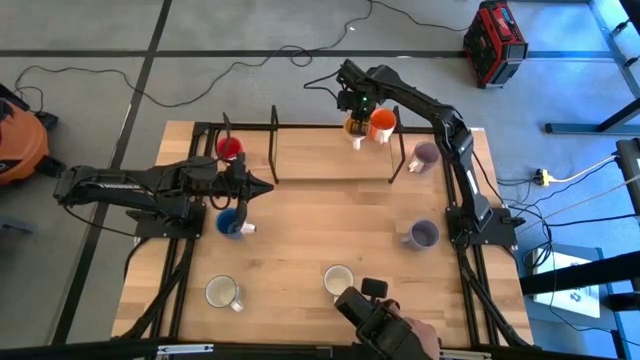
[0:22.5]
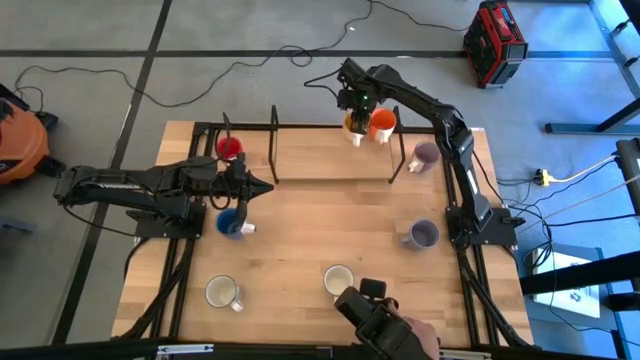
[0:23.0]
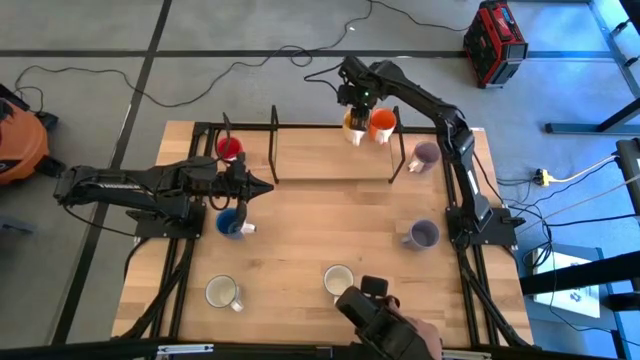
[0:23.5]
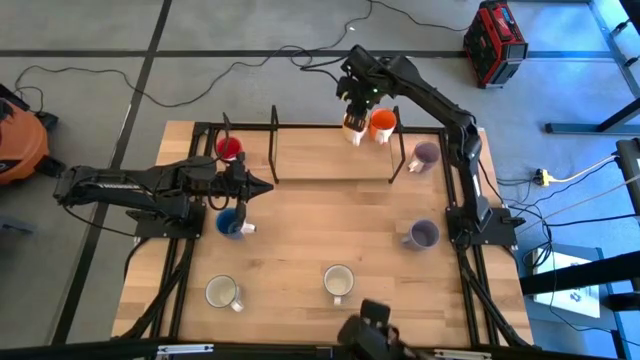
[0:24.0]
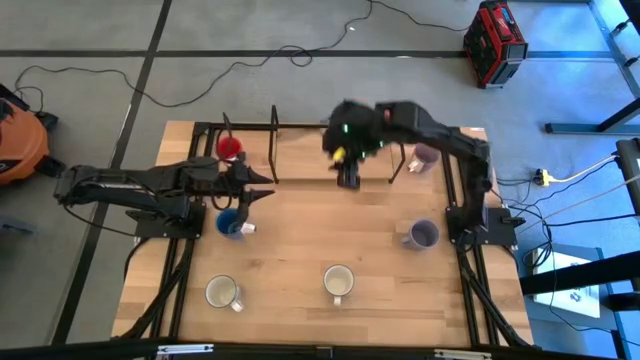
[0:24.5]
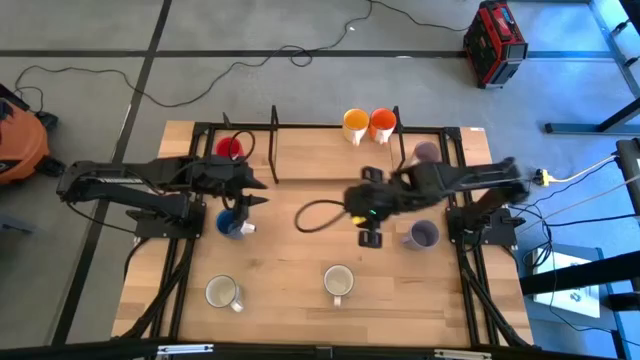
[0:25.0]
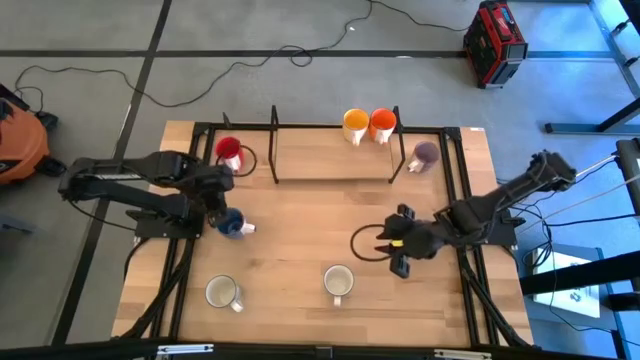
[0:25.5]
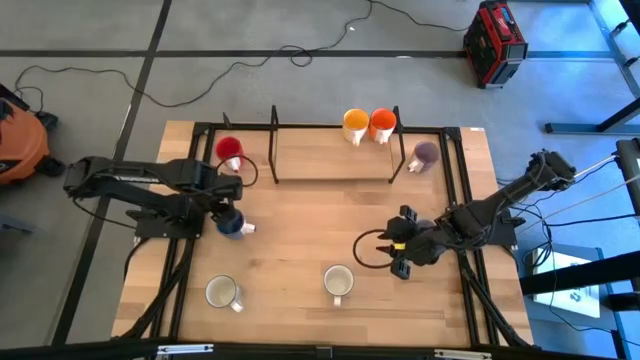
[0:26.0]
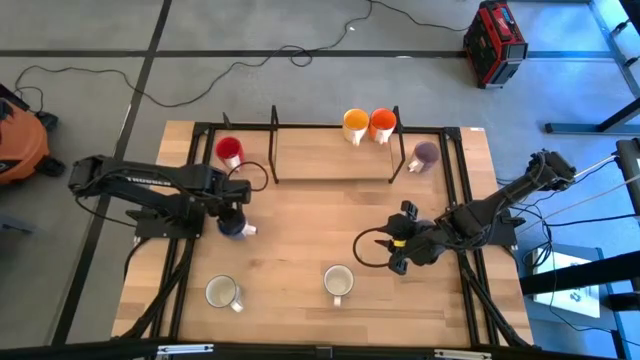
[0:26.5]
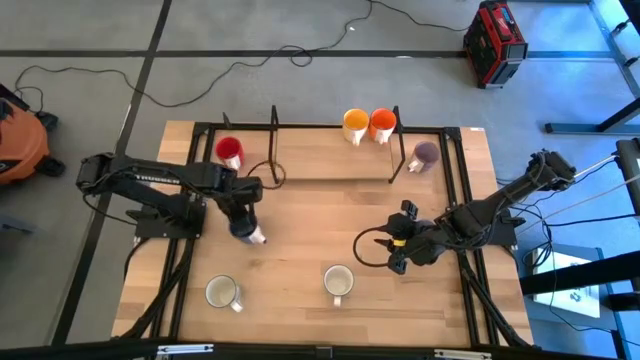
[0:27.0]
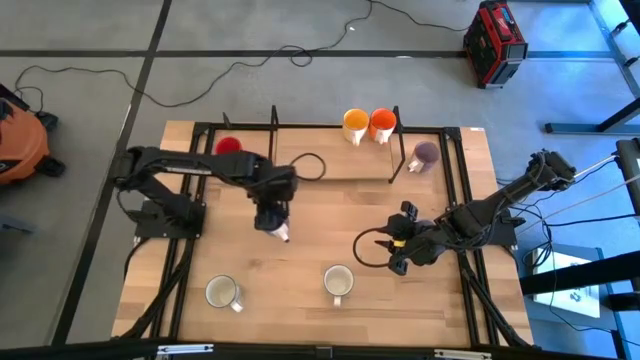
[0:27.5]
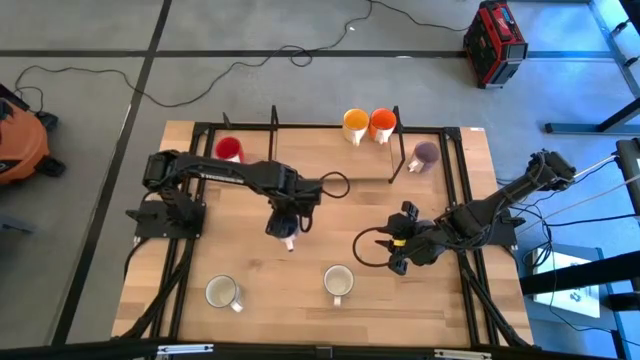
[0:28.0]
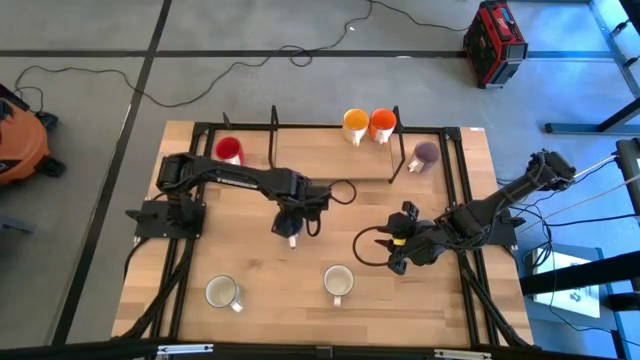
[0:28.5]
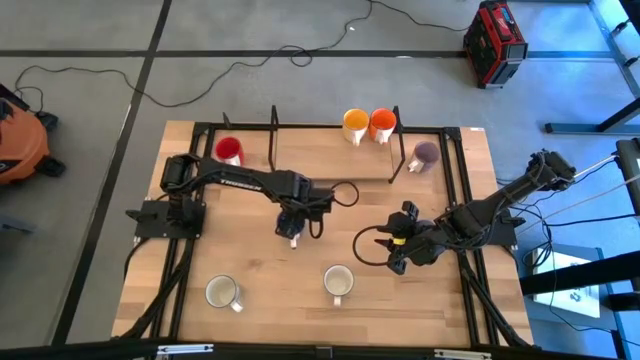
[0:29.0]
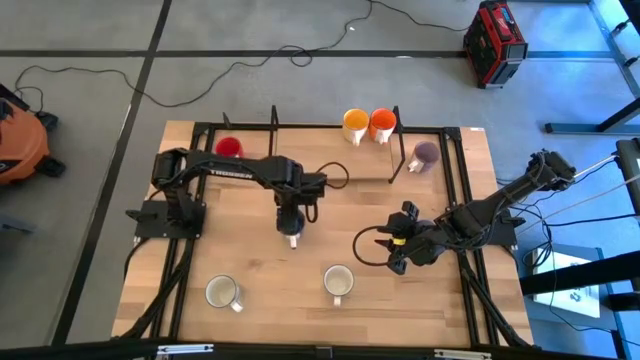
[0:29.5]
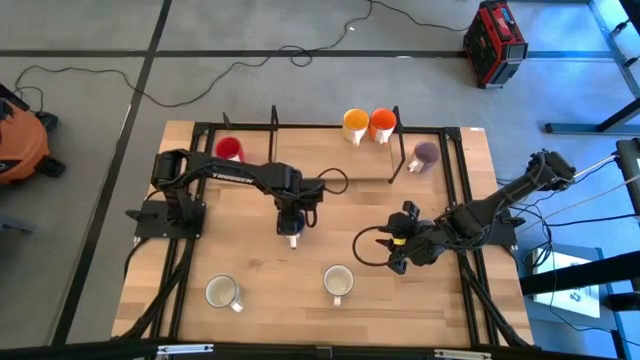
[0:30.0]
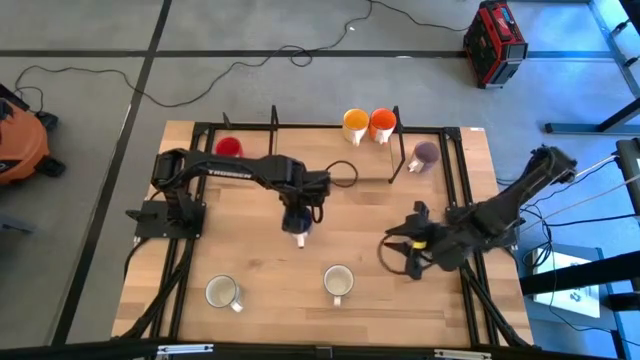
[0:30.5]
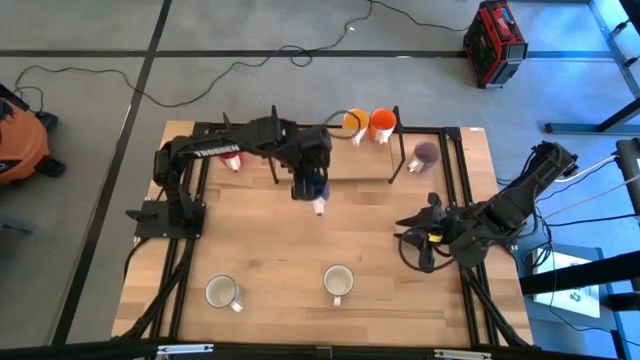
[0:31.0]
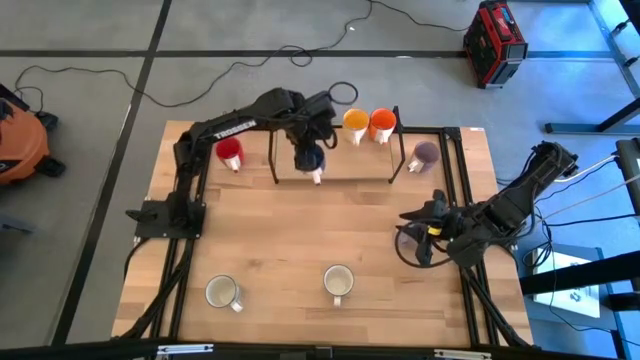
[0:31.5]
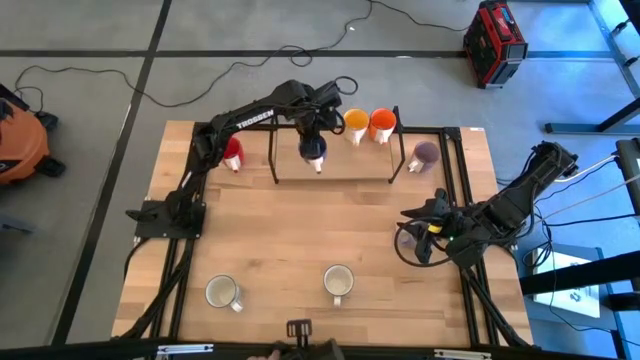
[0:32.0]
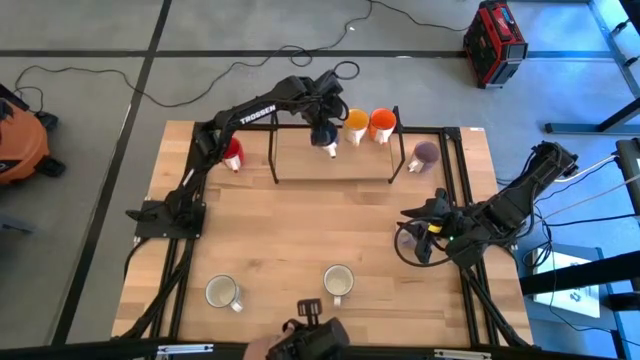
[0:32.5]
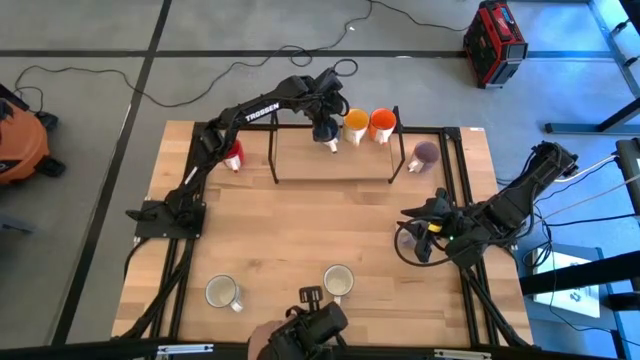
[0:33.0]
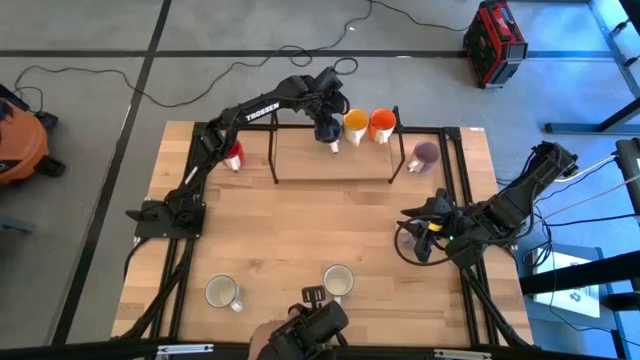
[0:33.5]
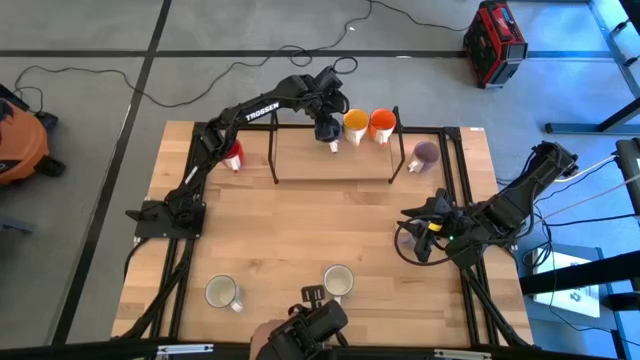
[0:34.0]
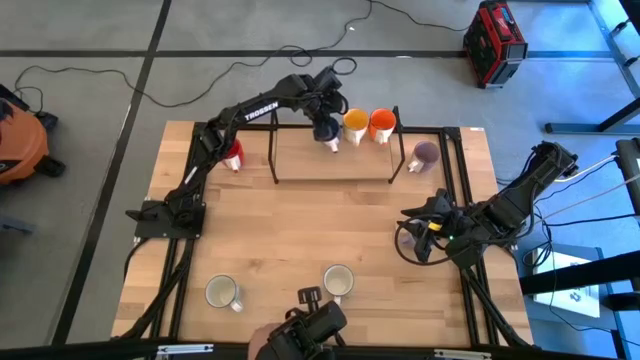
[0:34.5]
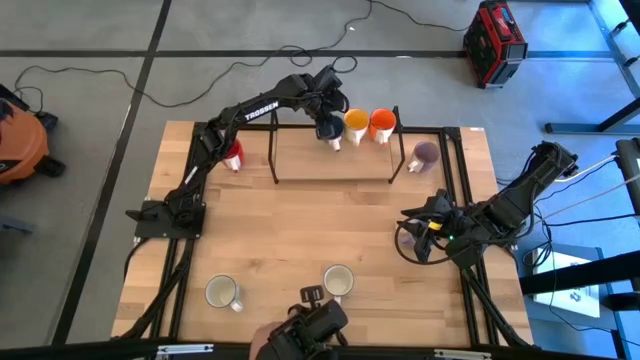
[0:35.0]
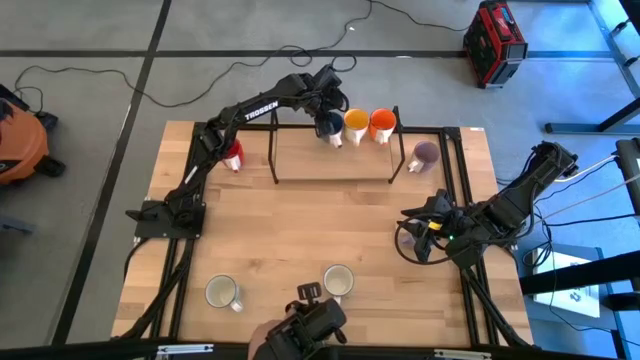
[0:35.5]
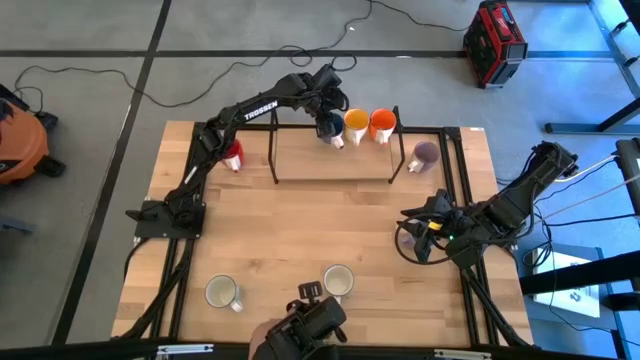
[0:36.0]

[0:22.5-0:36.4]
Task: Place coffee mugs
Put the blue mug on the shelf

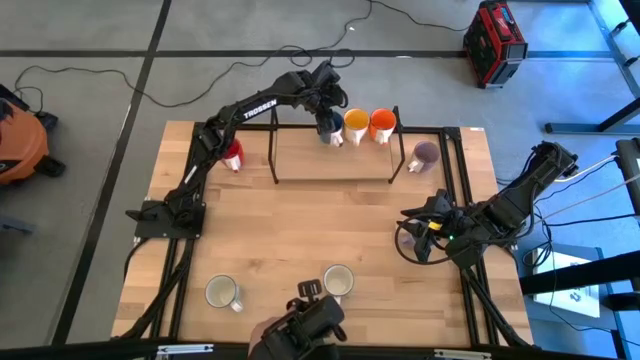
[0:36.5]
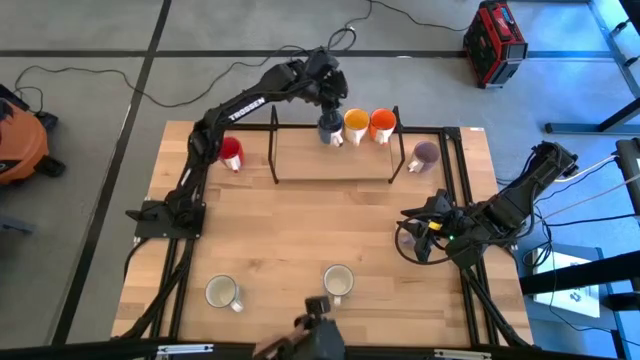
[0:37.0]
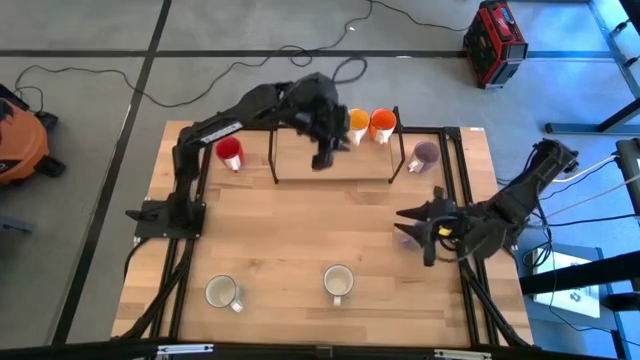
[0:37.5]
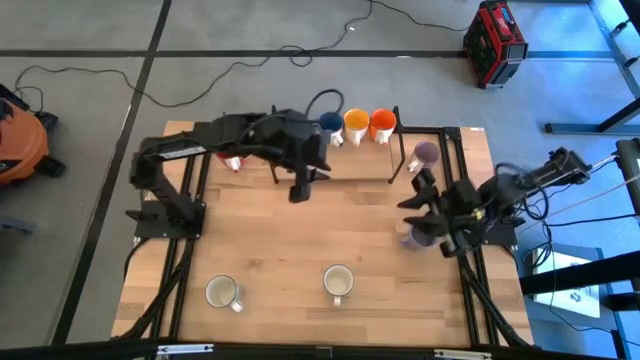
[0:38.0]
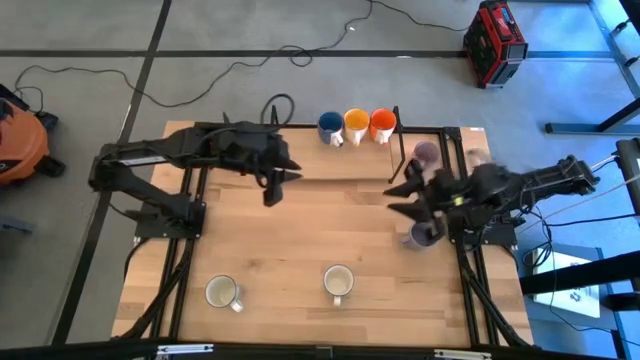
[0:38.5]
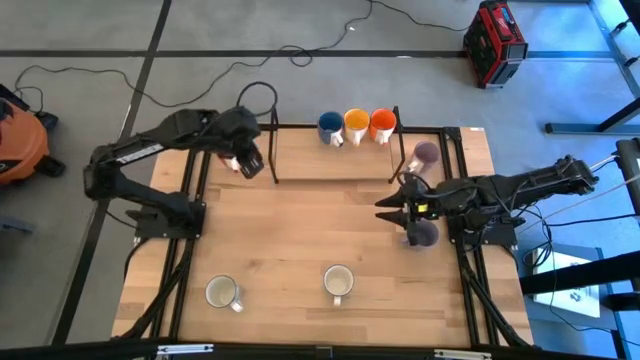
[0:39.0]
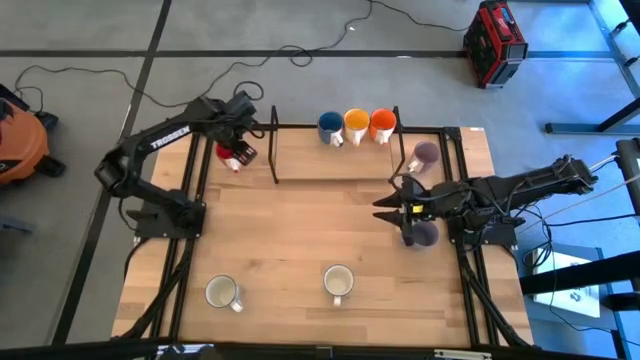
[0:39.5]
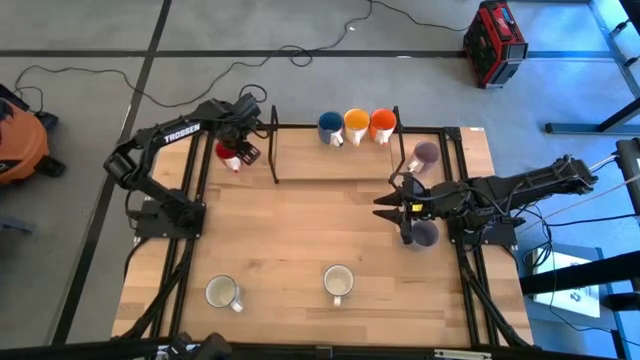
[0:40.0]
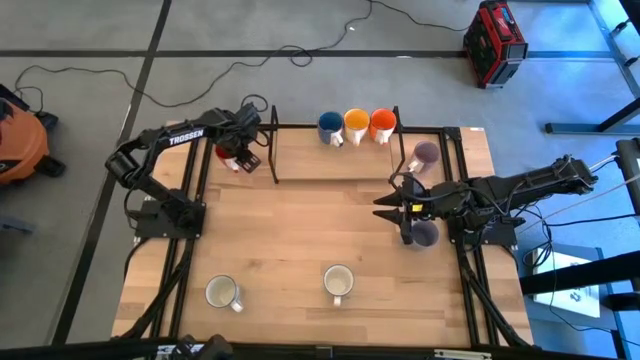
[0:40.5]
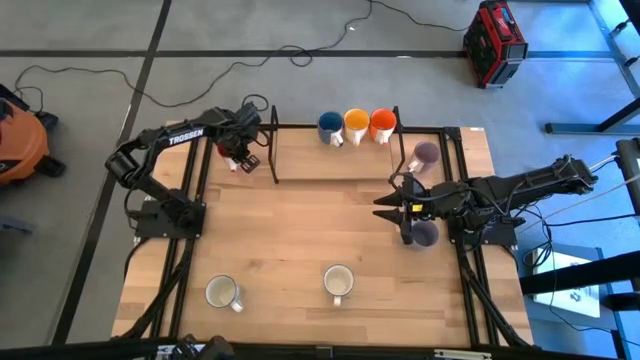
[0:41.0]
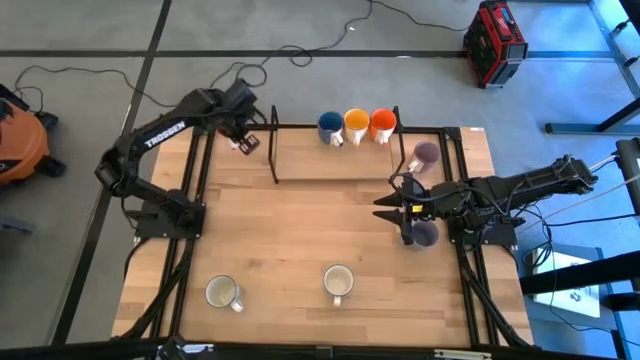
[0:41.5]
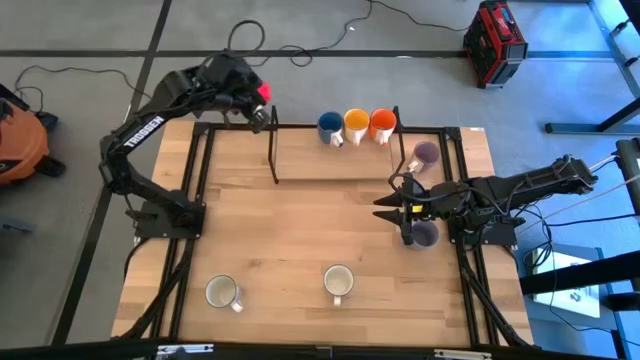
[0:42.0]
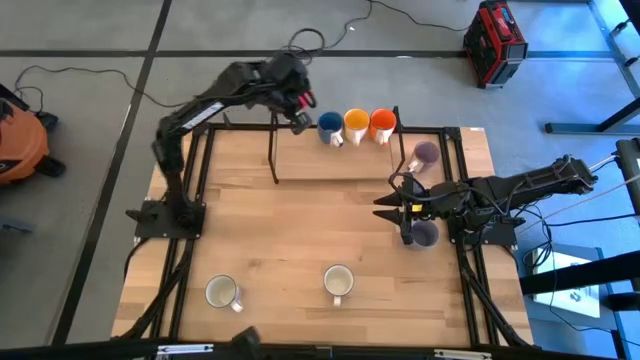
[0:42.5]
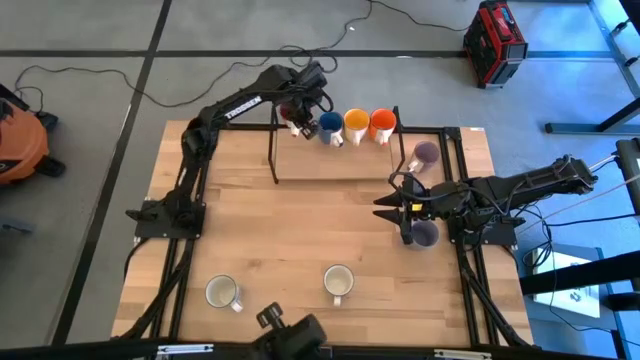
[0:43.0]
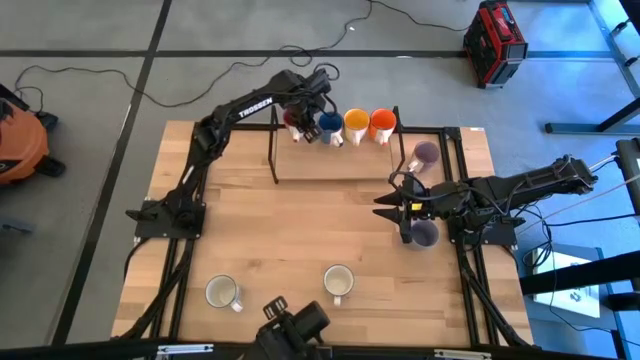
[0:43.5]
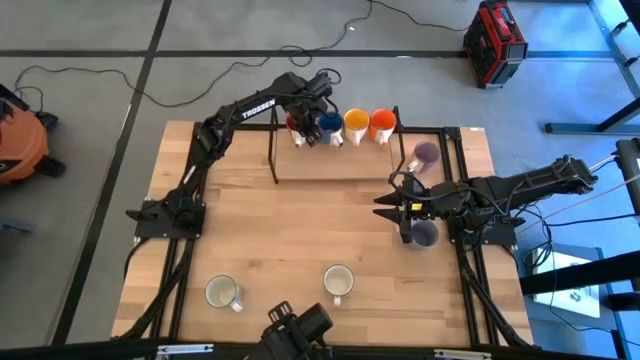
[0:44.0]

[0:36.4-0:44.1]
Put the red mug on the shelf
